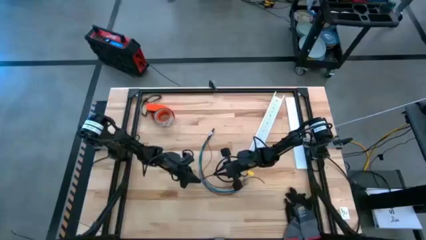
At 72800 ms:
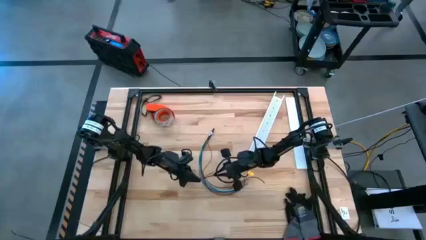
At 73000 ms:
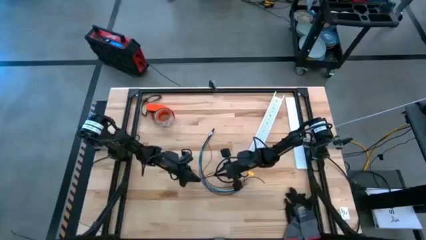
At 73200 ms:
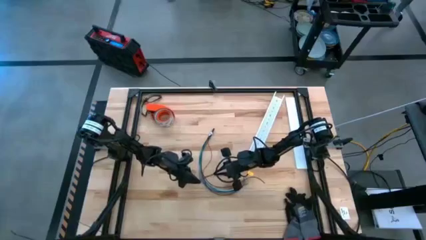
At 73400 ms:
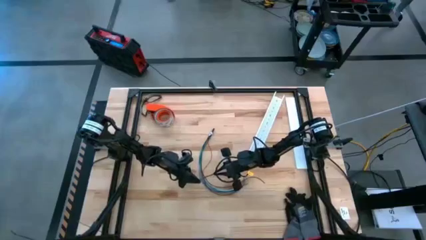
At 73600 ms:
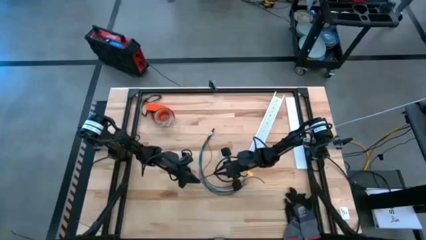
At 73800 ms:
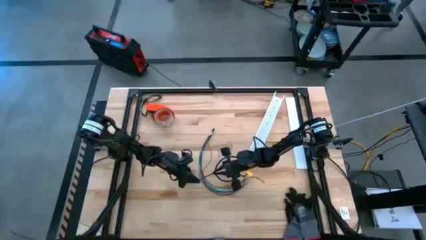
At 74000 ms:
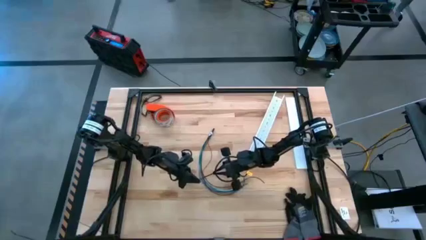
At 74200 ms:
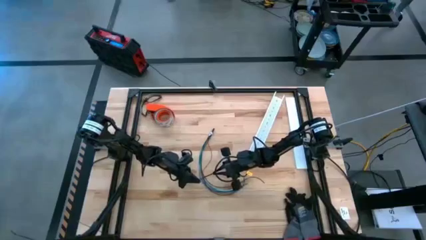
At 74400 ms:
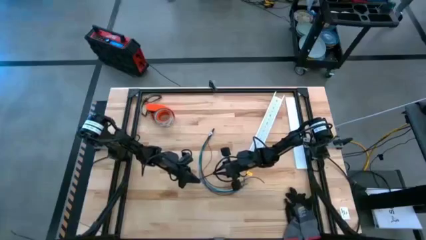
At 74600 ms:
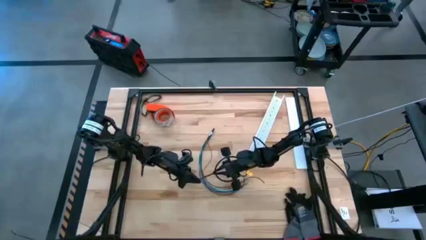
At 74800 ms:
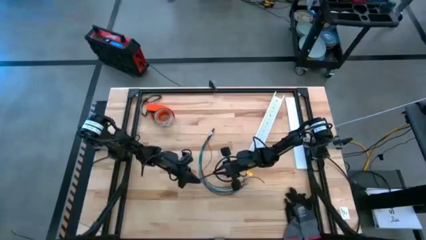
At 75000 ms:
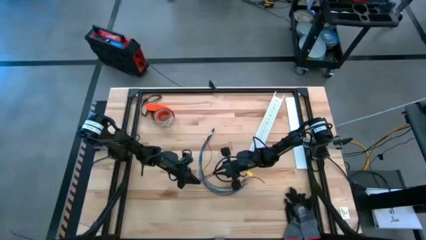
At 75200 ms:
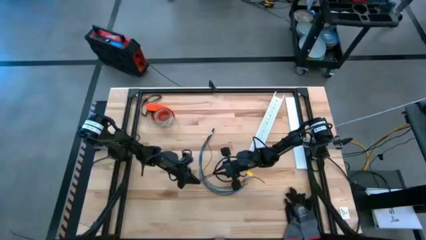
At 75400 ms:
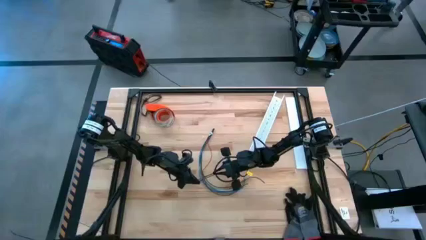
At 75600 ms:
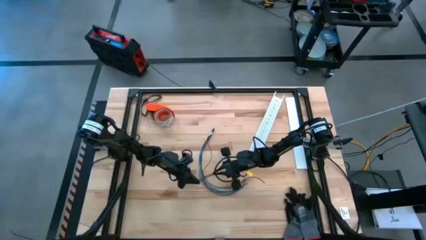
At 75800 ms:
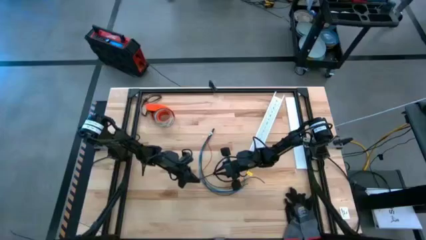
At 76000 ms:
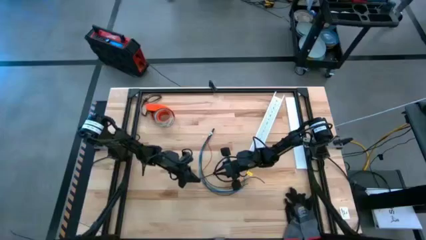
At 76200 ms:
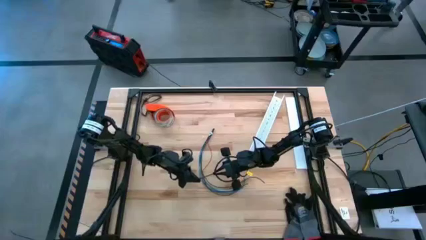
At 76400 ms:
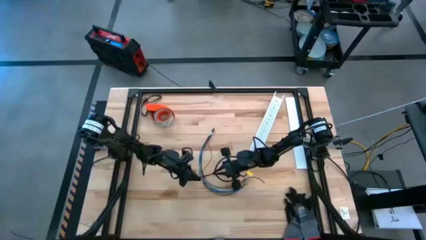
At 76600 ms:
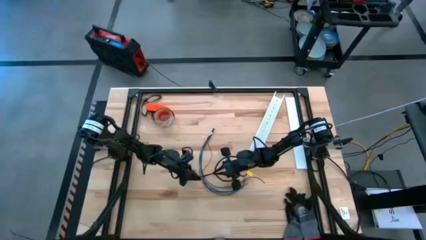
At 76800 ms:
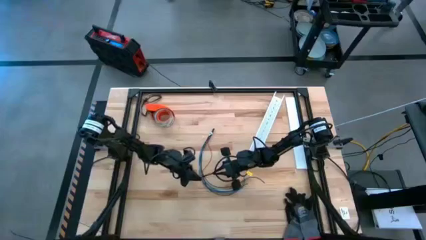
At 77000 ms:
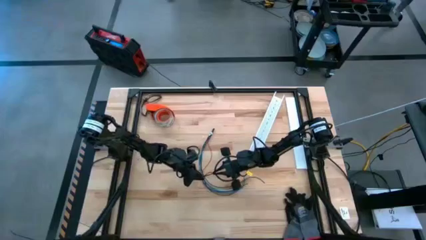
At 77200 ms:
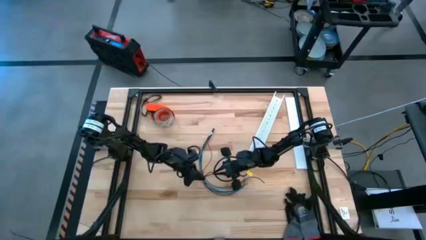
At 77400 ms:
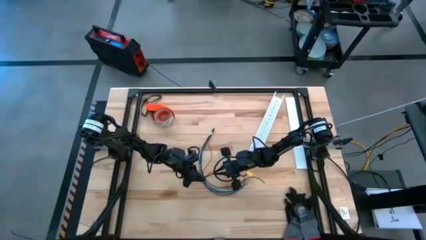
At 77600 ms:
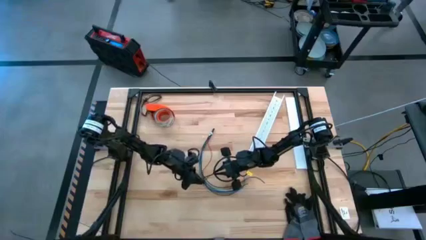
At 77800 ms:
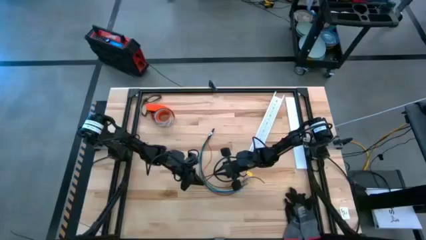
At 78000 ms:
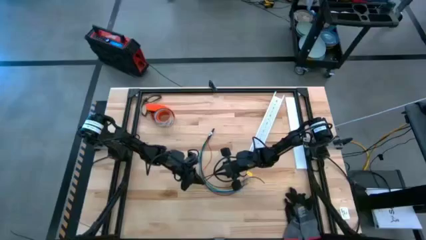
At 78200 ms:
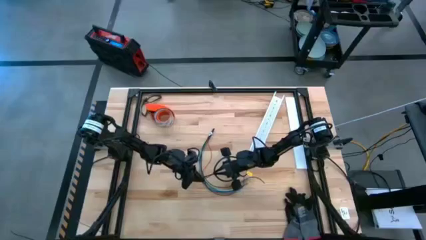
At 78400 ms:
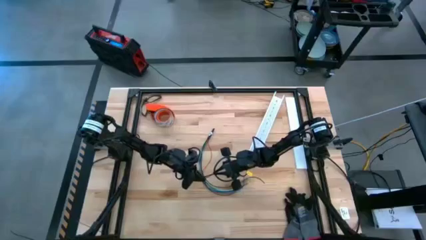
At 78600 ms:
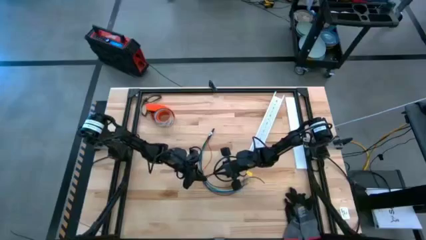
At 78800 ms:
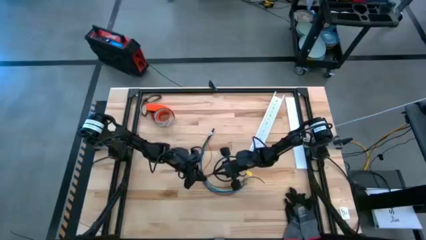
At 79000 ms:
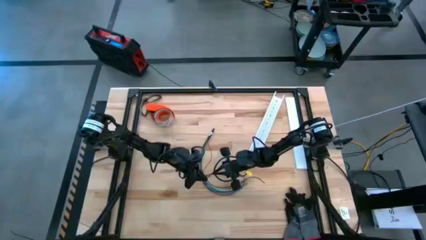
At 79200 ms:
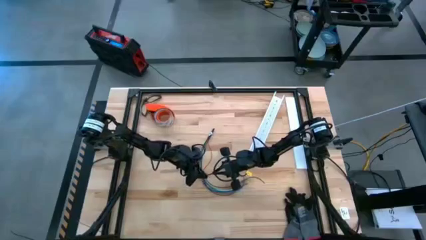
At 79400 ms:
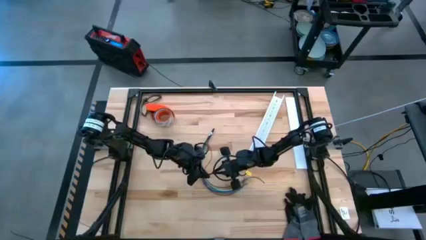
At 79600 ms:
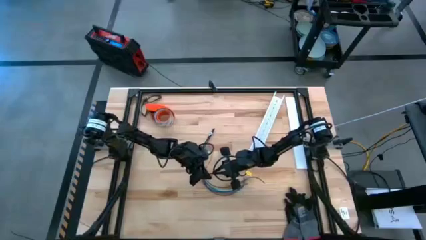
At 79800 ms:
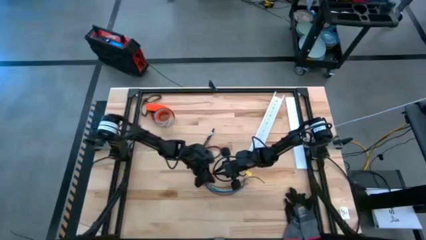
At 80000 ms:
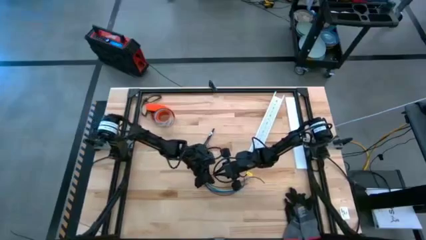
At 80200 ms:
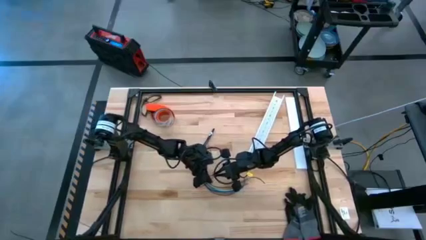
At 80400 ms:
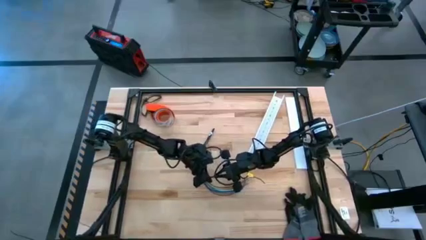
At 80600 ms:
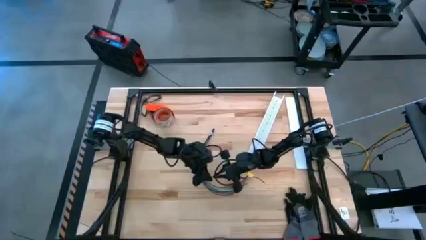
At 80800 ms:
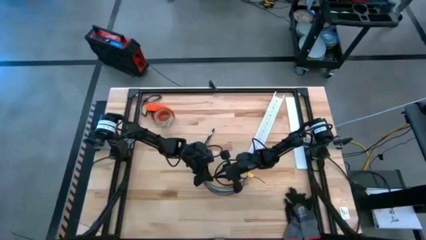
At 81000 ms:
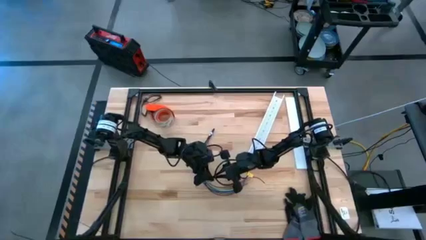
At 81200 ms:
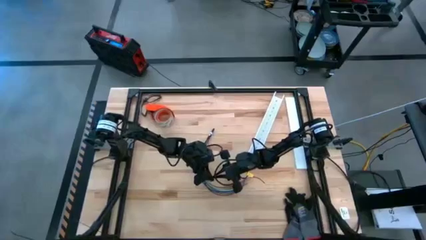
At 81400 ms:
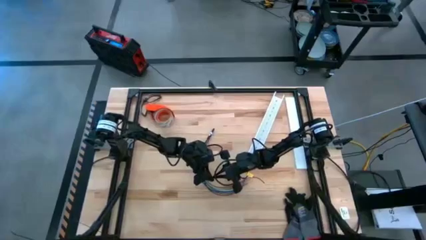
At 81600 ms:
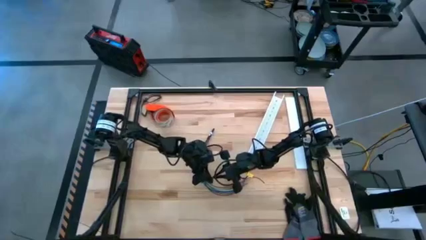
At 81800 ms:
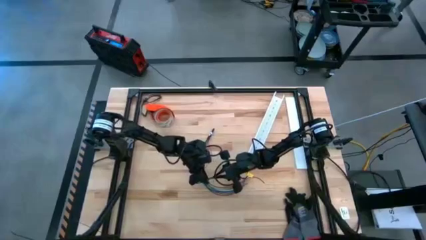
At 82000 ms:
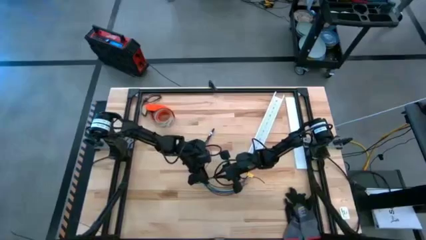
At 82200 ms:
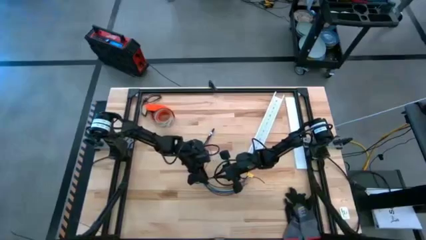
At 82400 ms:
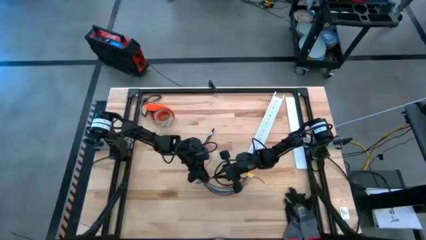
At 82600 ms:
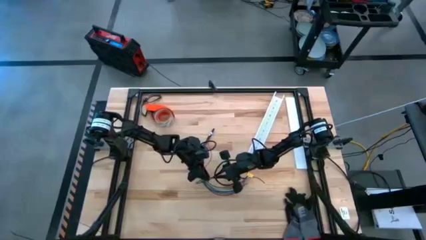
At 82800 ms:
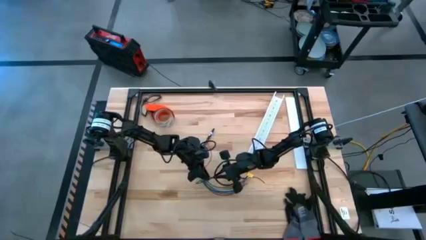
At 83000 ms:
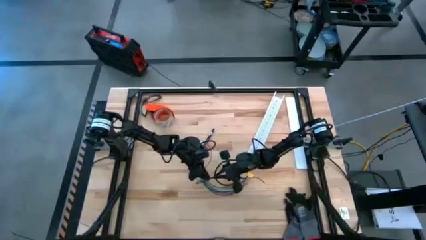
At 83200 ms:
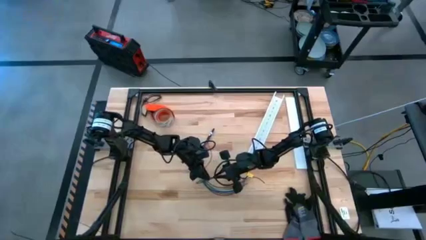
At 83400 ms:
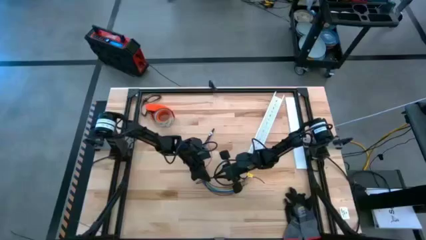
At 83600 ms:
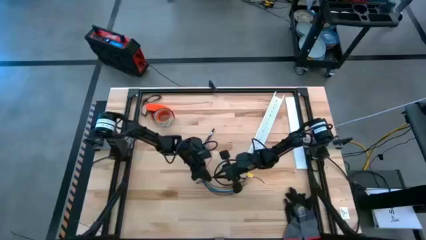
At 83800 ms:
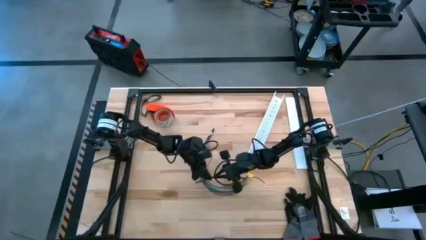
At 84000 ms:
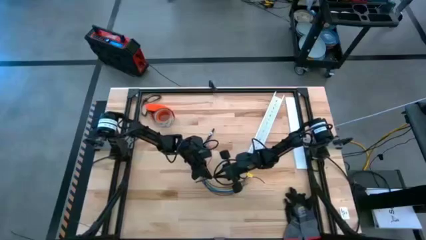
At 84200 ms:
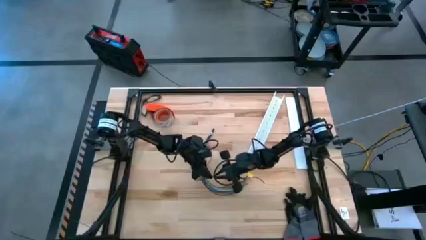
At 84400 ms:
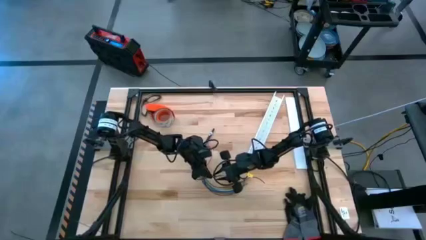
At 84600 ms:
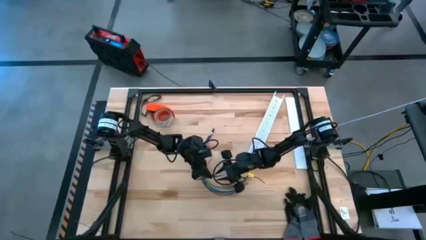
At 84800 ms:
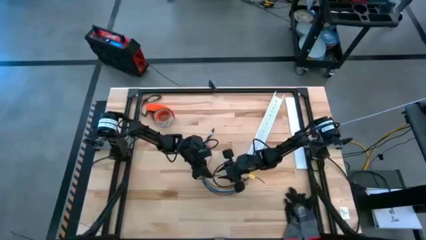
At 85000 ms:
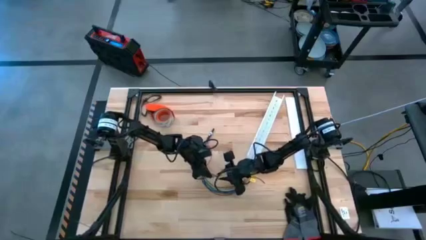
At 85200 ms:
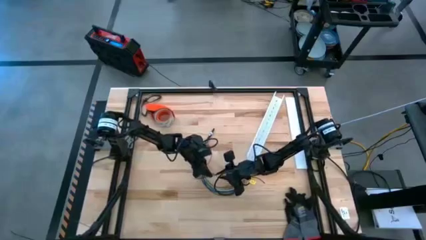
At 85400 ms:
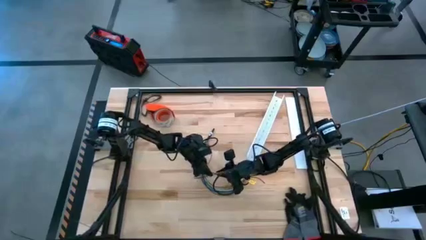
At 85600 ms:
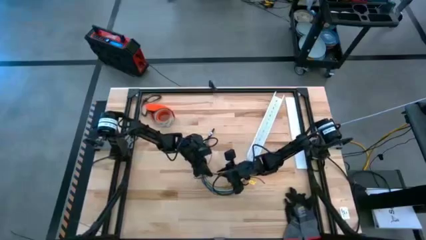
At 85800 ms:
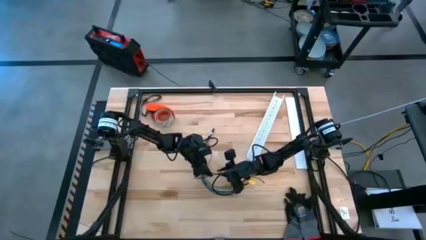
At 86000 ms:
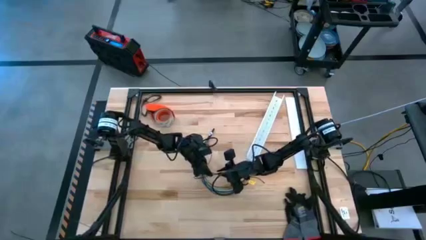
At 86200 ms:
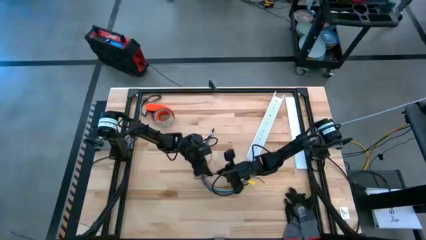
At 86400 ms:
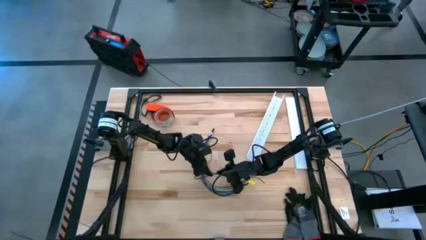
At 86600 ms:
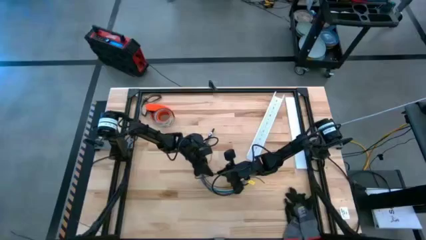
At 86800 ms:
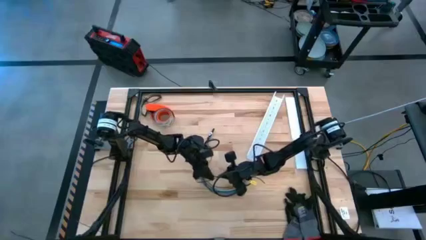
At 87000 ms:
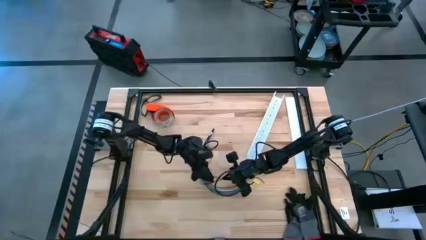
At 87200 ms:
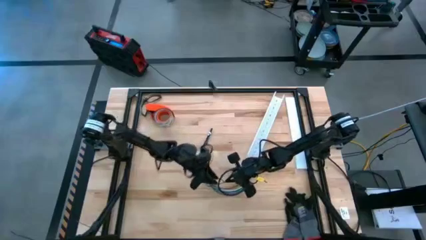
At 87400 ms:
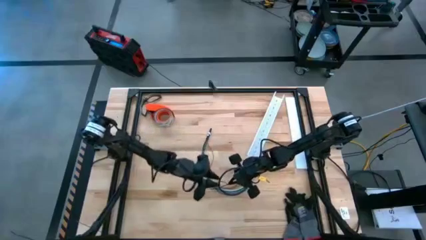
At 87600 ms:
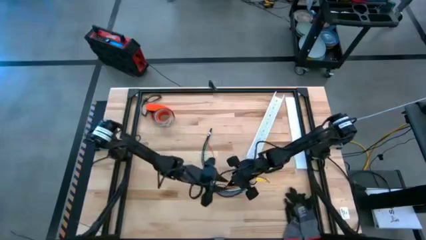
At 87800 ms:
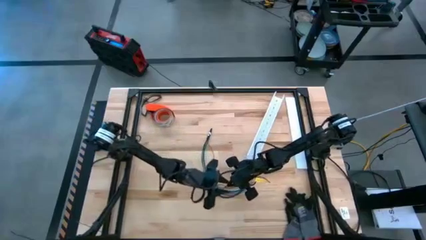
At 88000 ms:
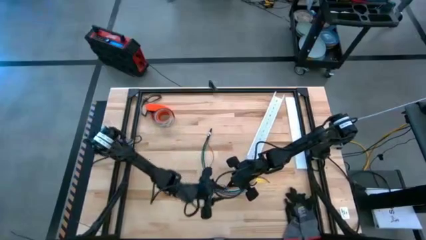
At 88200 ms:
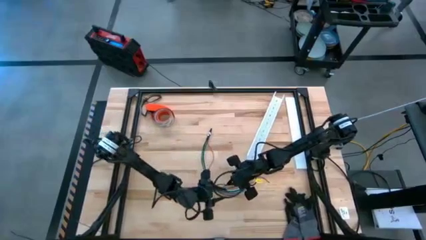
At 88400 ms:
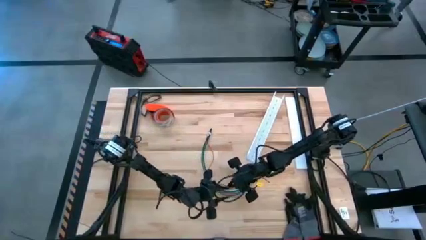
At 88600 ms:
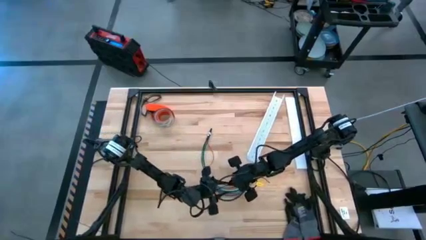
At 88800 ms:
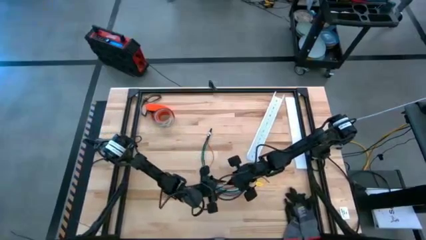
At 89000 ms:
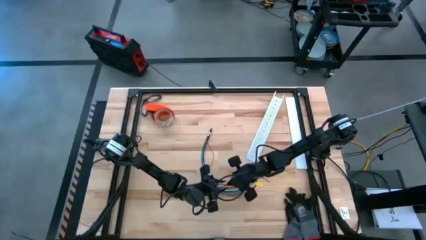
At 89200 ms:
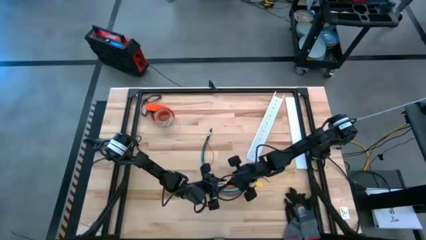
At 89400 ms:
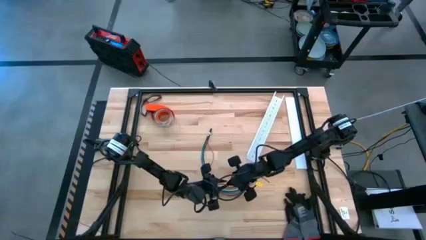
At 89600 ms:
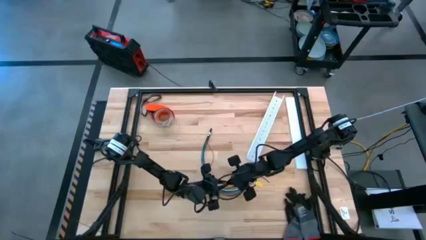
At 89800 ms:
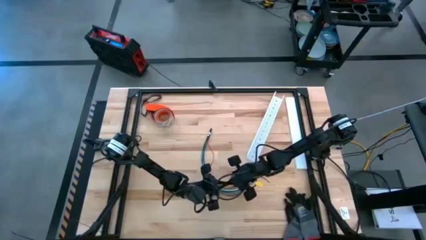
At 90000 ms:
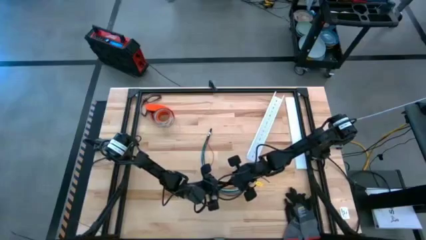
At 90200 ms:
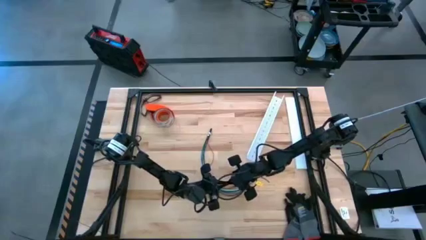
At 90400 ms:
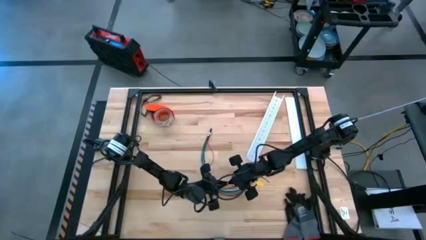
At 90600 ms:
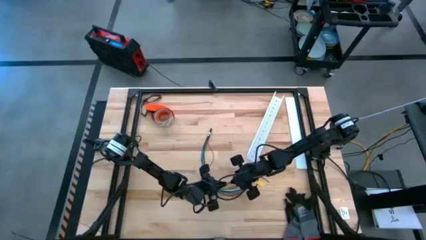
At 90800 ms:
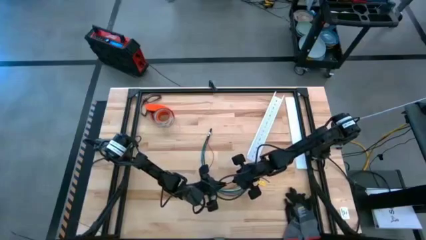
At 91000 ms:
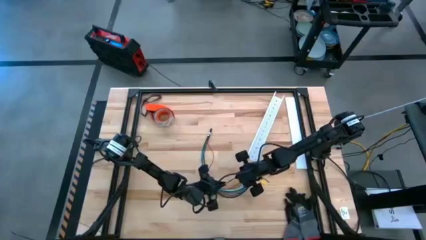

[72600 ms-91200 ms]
Task: Ziptie cables
Wrap the cables together using a black zip tie
